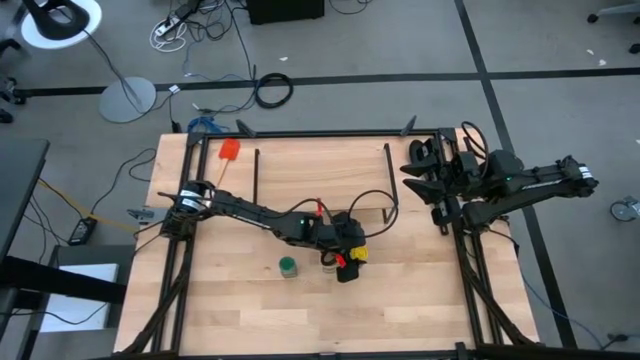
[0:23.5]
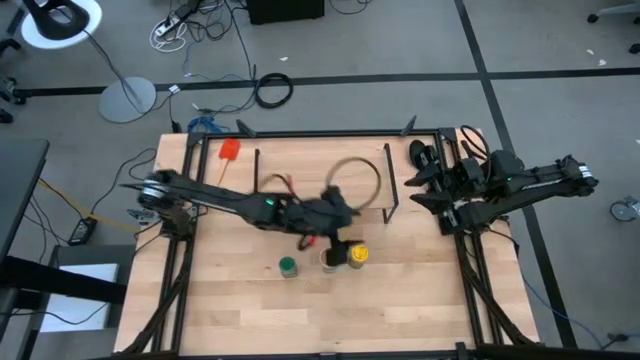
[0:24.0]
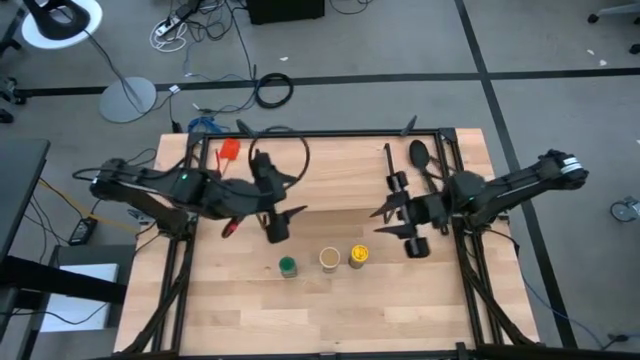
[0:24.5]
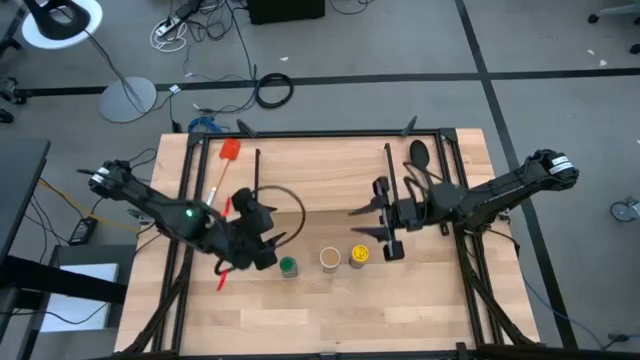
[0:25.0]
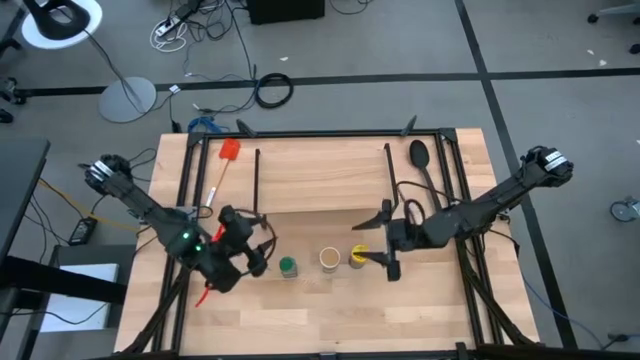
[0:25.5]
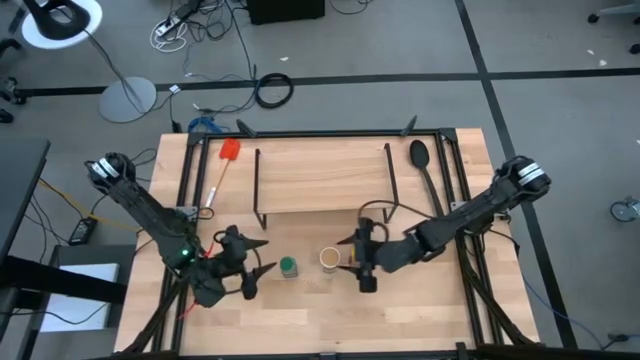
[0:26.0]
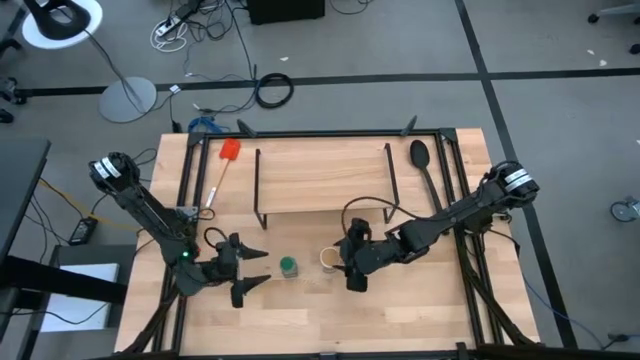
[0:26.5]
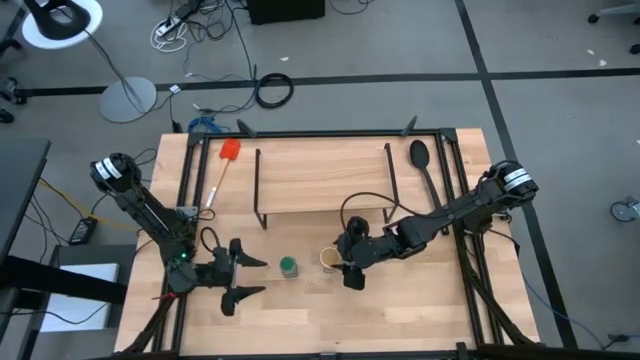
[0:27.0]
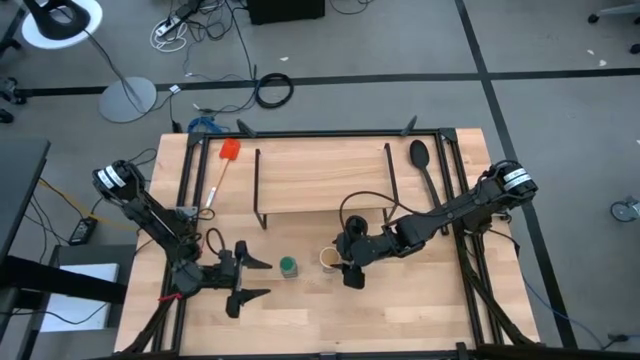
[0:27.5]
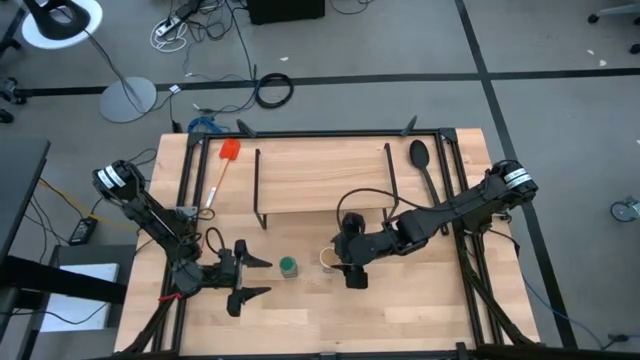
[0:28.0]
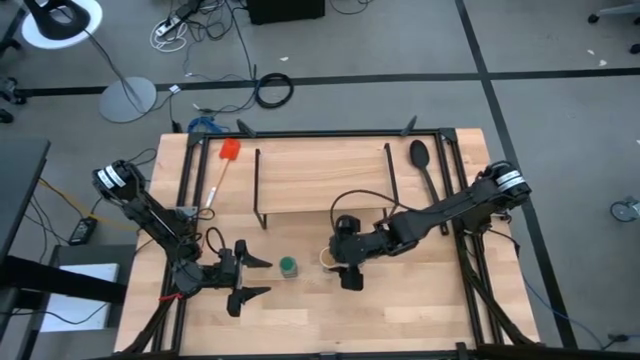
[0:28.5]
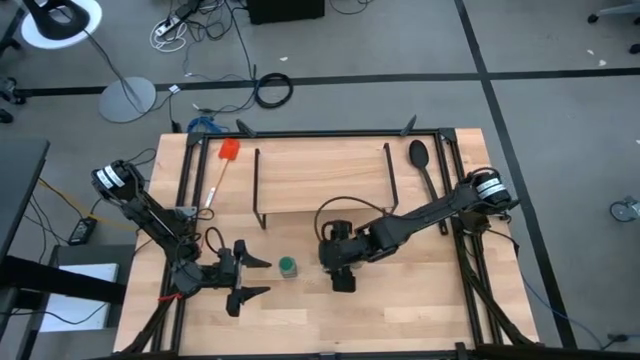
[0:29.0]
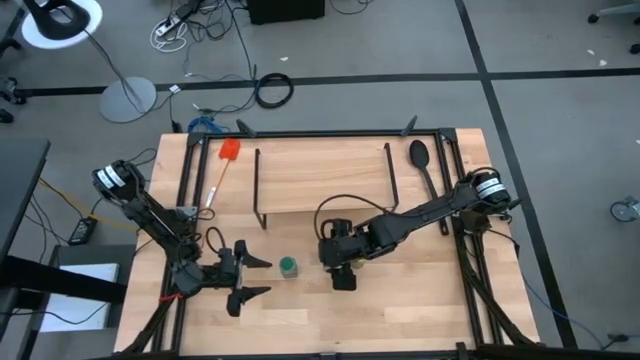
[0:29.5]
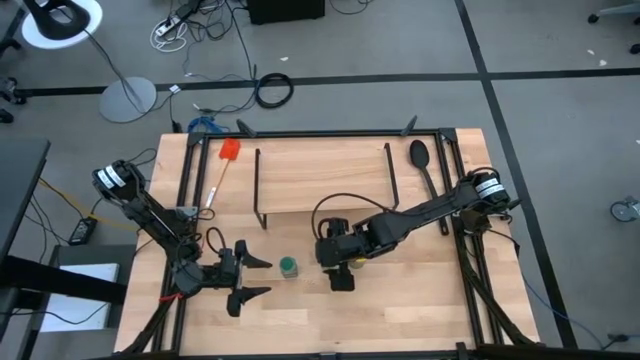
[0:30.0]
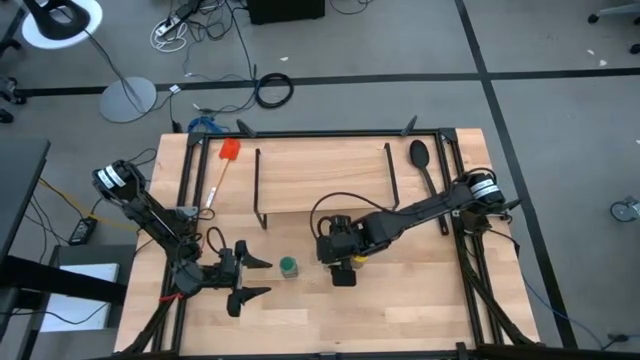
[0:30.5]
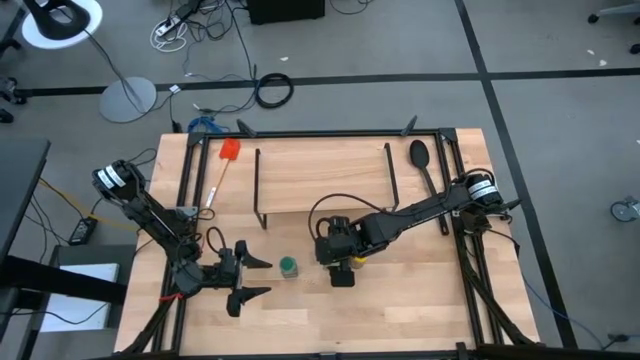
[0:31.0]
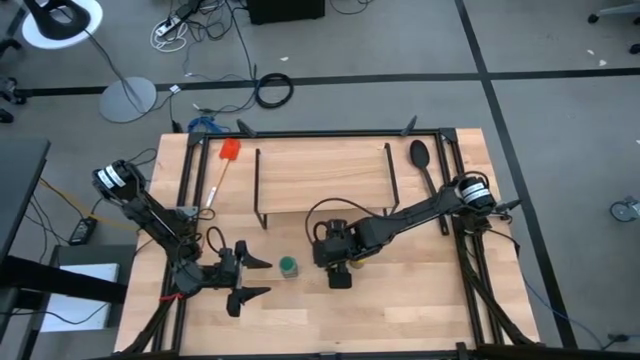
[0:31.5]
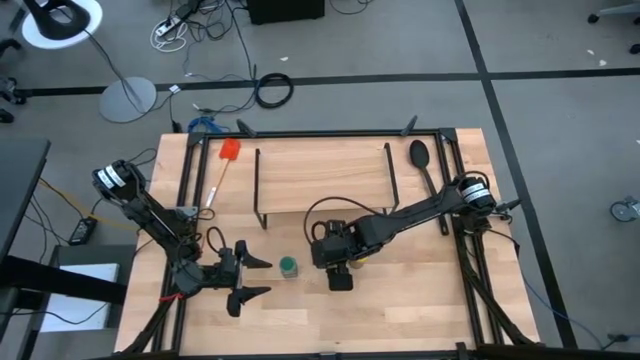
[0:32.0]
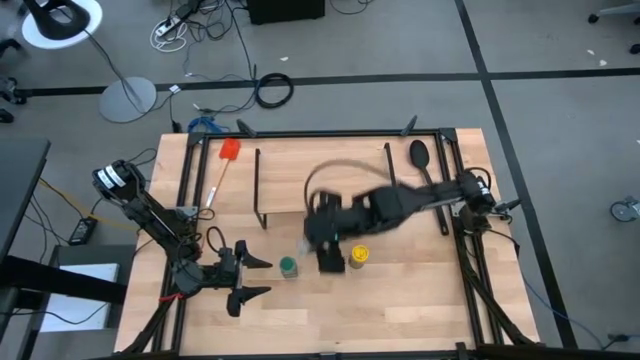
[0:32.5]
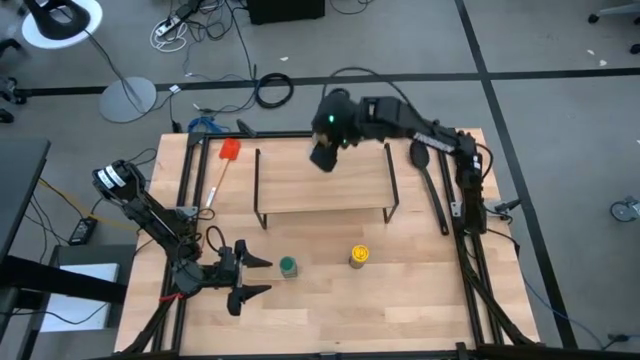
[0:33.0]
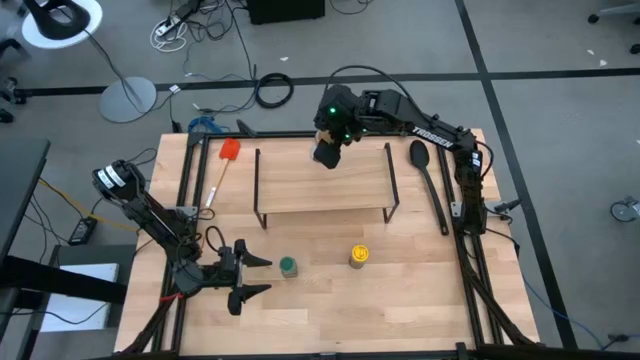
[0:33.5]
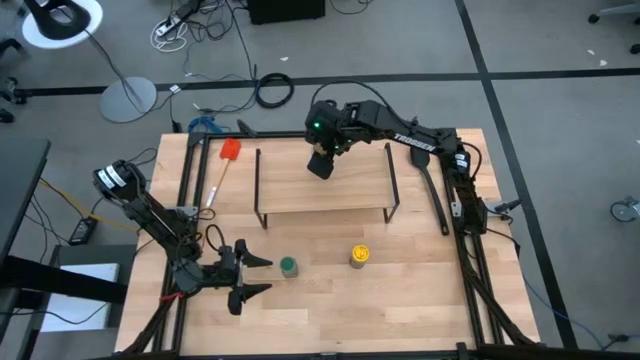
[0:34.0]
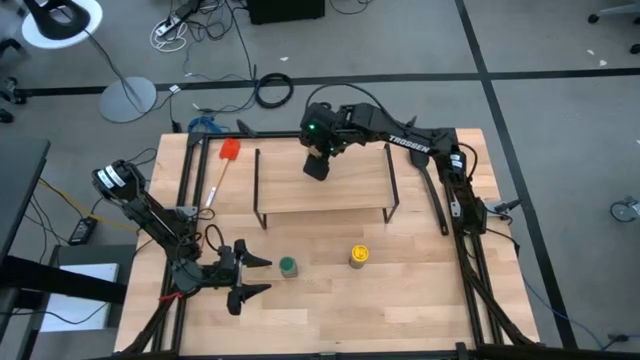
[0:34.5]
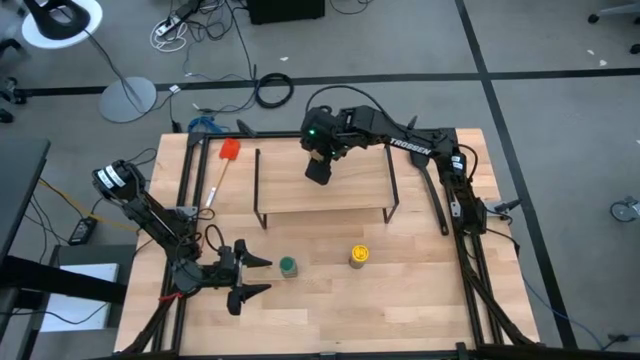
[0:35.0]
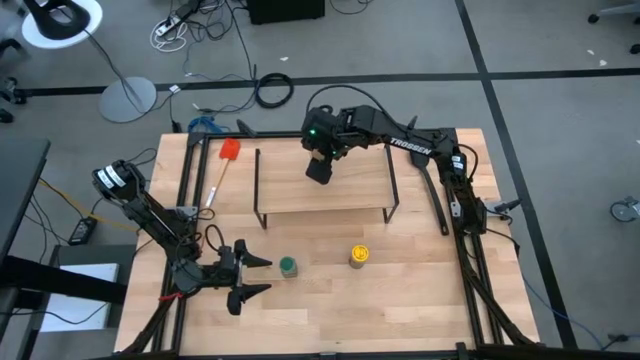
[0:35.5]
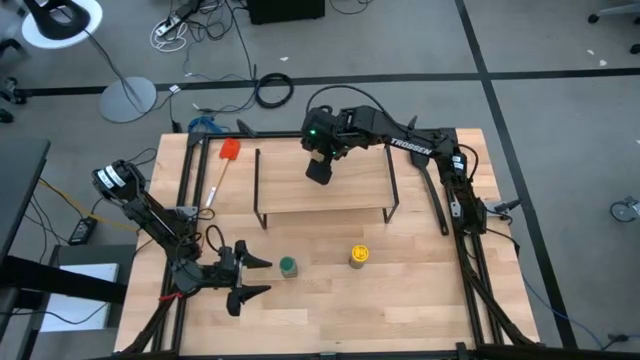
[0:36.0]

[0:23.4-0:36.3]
Task: Shelf spices
Put the brown seasoning bottle on the shelf

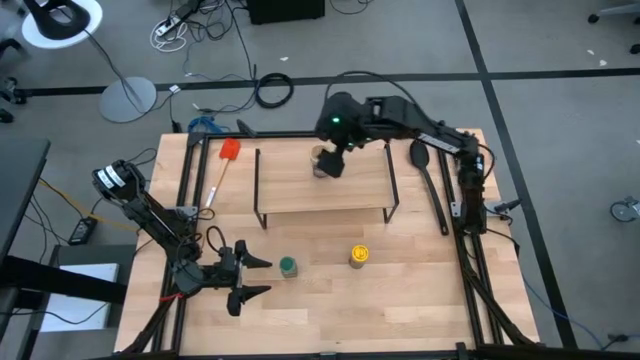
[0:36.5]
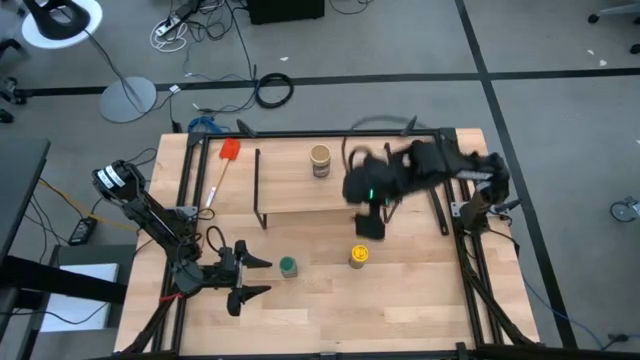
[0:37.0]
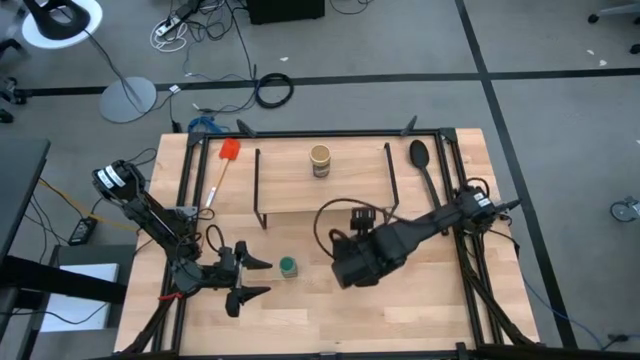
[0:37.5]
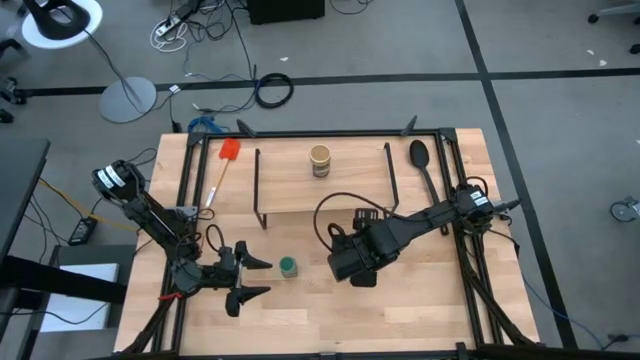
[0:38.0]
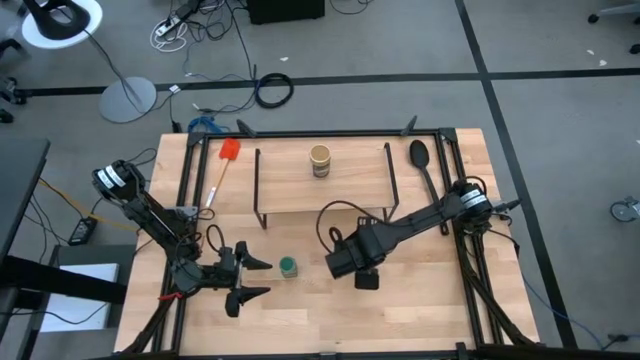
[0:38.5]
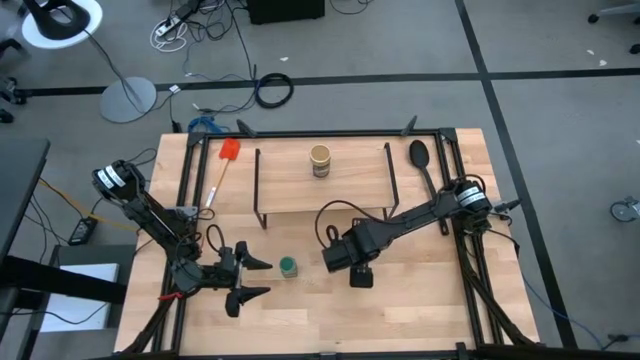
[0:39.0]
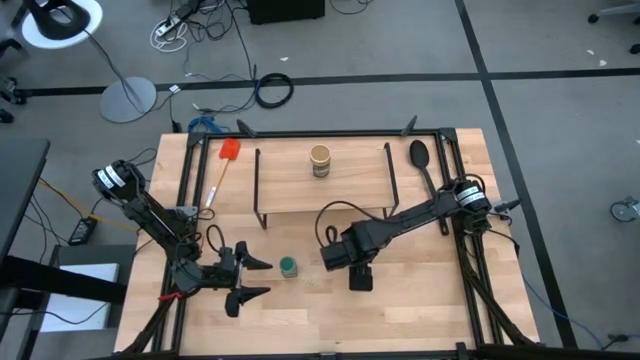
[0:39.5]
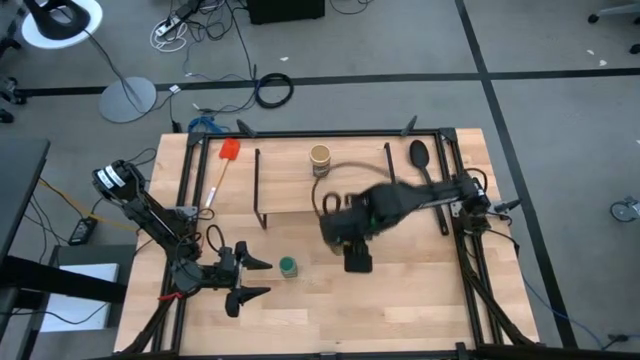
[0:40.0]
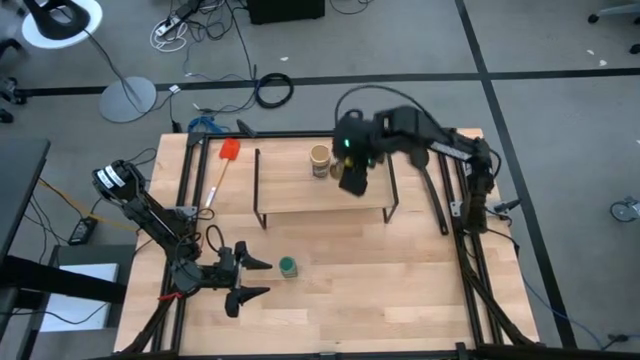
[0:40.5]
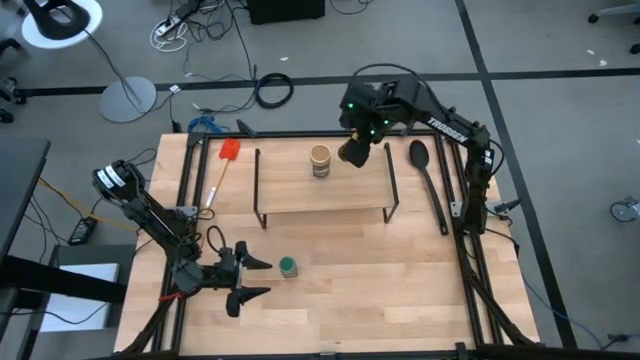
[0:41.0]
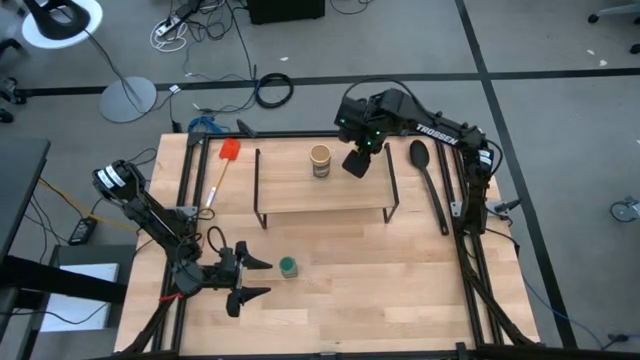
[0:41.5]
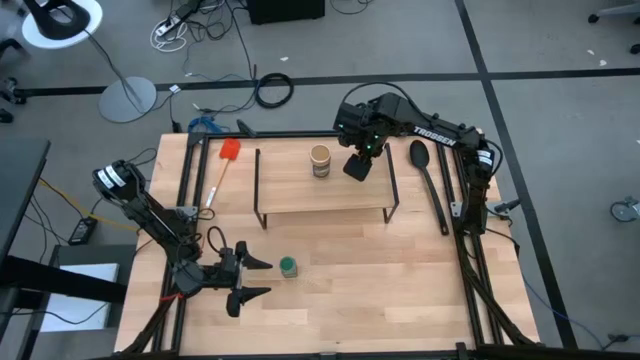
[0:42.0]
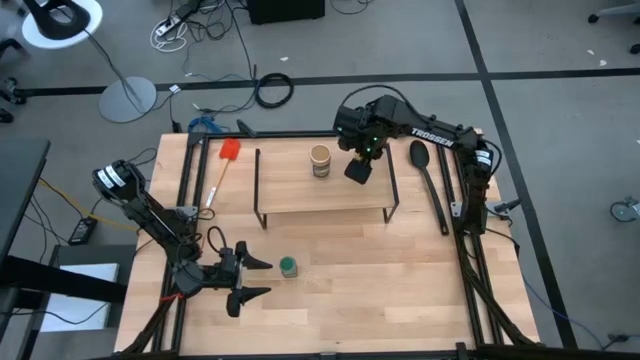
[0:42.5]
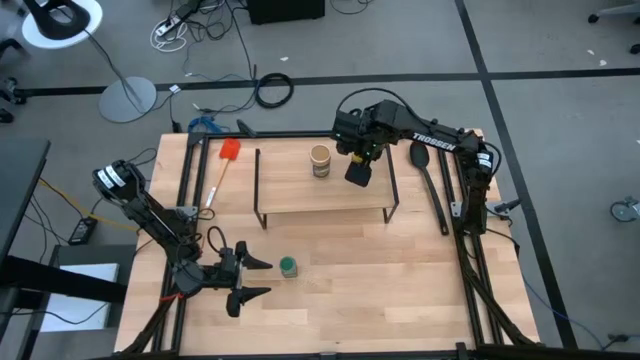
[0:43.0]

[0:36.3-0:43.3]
Put the yellow seasoning bottle on the shelf

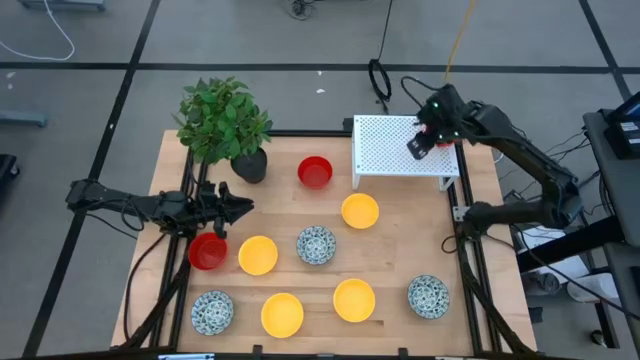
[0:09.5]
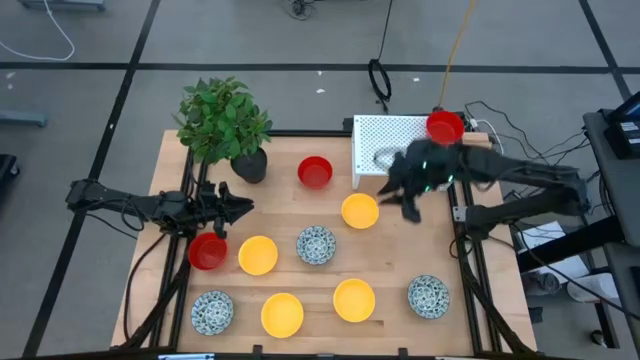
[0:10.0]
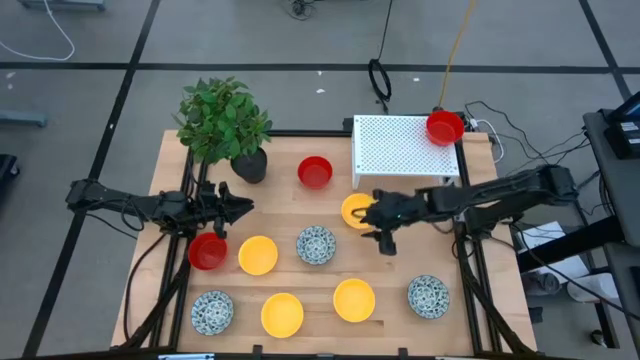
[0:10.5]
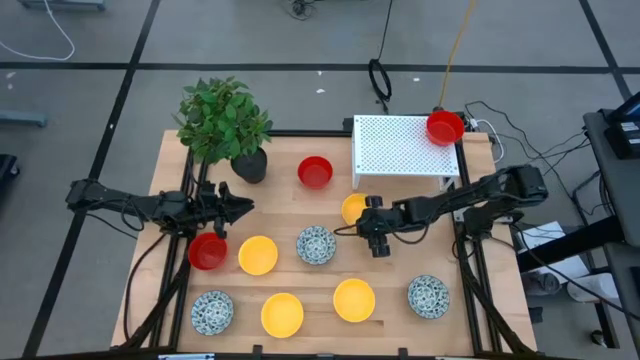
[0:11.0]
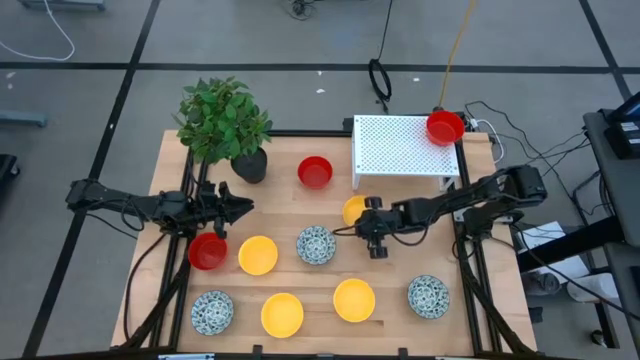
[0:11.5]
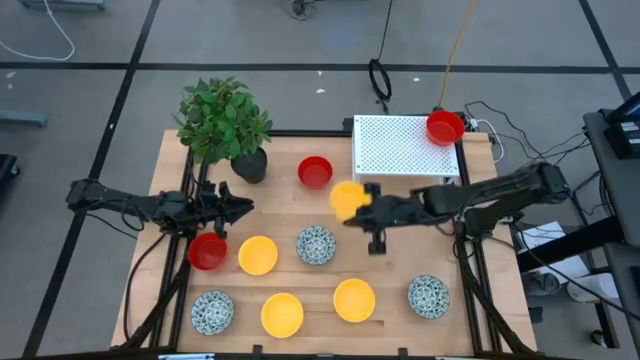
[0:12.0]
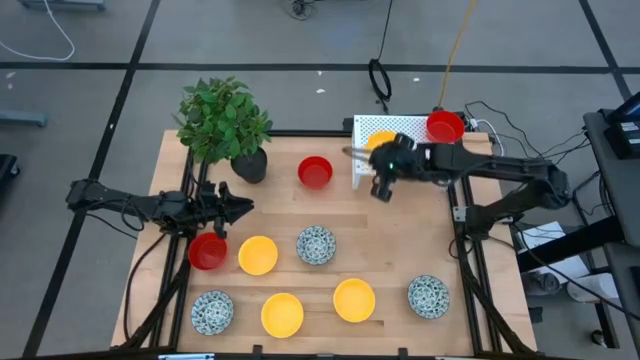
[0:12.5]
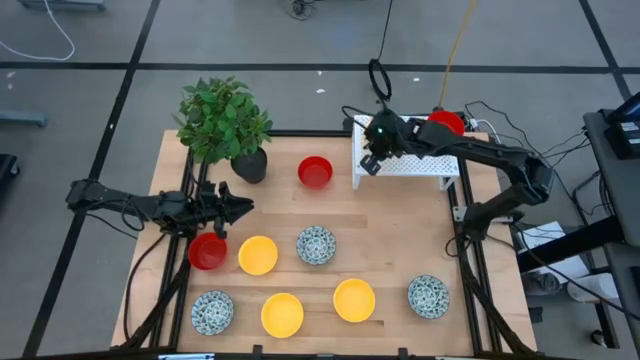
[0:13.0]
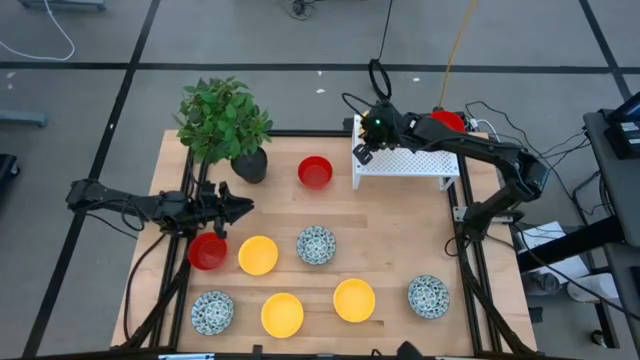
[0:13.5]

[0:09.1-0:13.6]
Task: Pick & Place Mini bowls
Put the yellow bowl on the shelf
